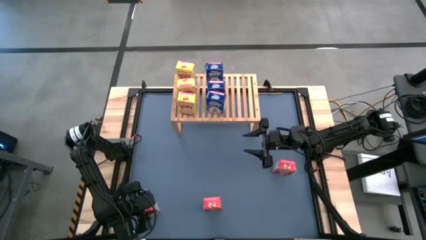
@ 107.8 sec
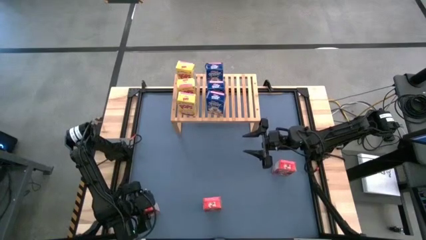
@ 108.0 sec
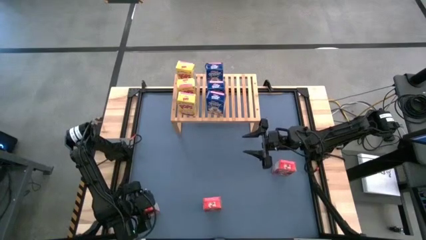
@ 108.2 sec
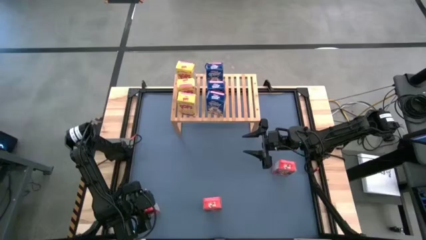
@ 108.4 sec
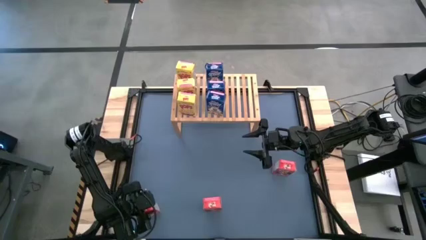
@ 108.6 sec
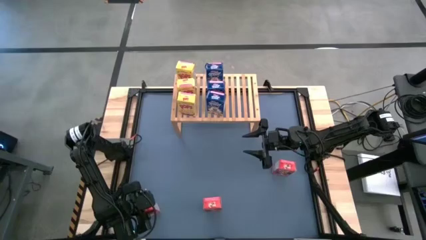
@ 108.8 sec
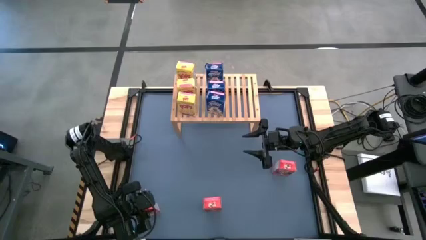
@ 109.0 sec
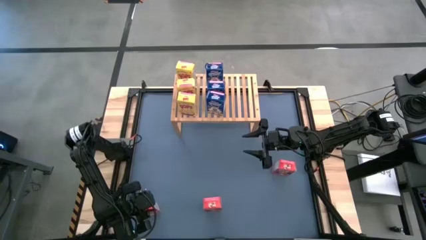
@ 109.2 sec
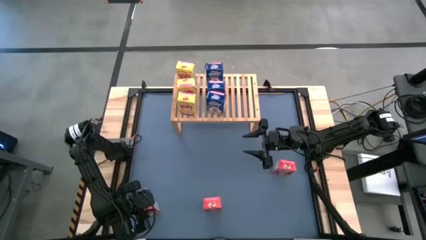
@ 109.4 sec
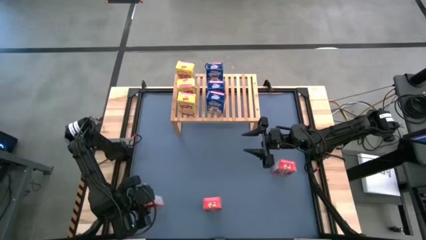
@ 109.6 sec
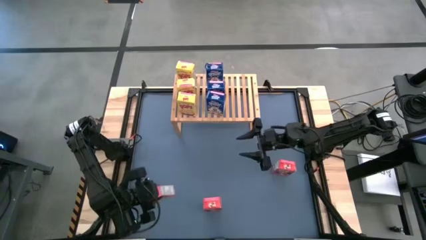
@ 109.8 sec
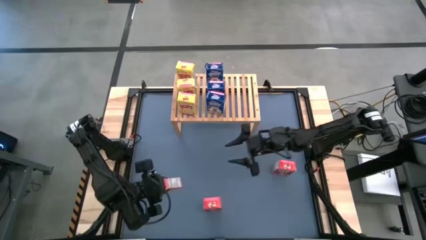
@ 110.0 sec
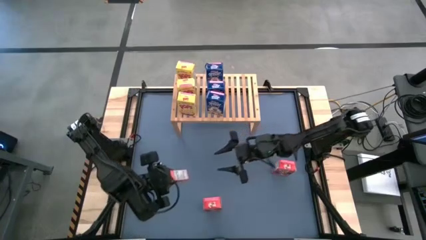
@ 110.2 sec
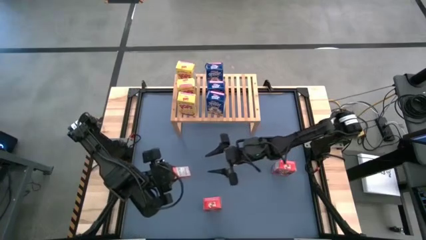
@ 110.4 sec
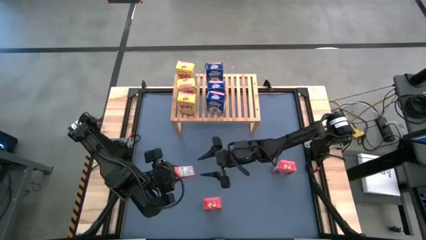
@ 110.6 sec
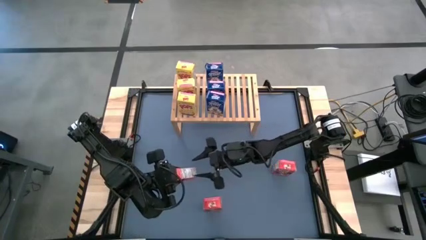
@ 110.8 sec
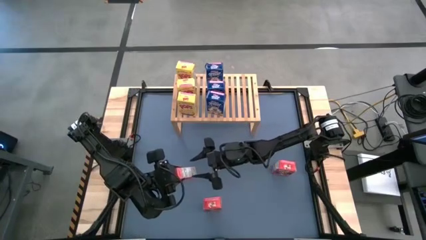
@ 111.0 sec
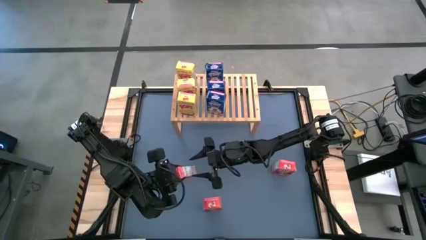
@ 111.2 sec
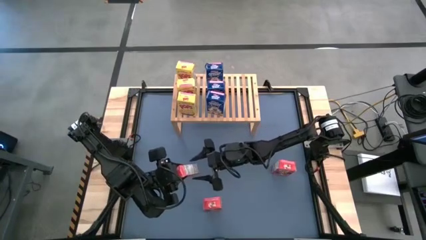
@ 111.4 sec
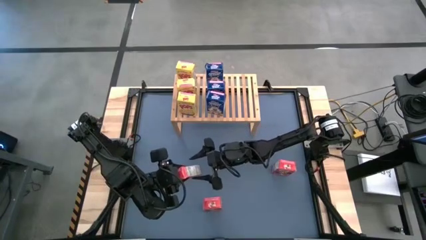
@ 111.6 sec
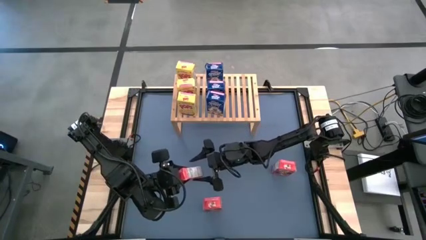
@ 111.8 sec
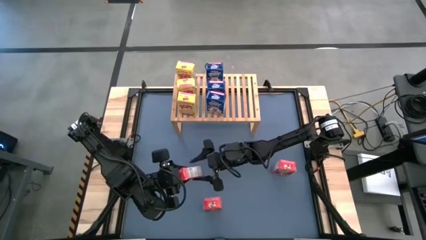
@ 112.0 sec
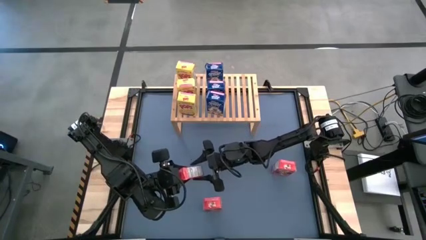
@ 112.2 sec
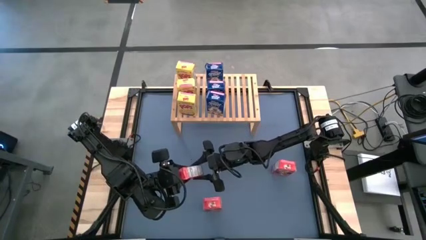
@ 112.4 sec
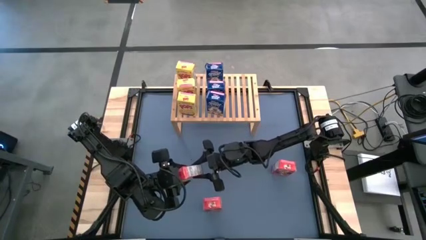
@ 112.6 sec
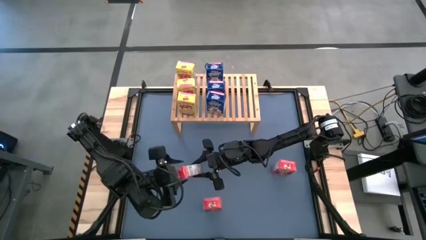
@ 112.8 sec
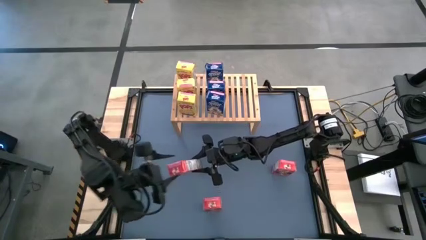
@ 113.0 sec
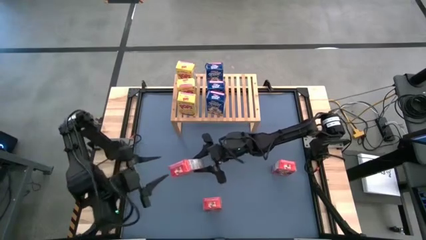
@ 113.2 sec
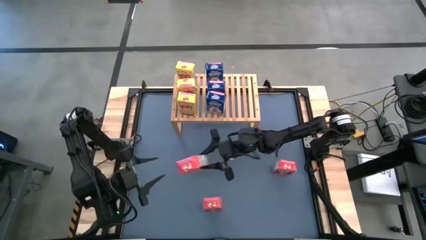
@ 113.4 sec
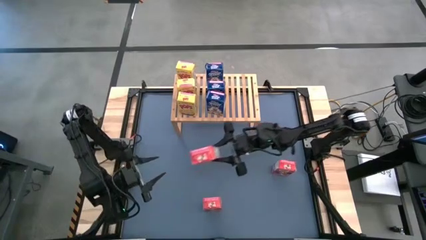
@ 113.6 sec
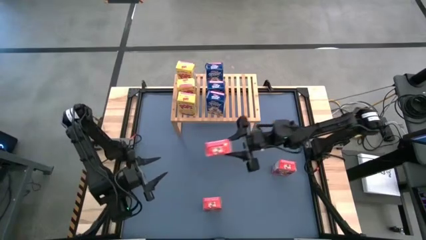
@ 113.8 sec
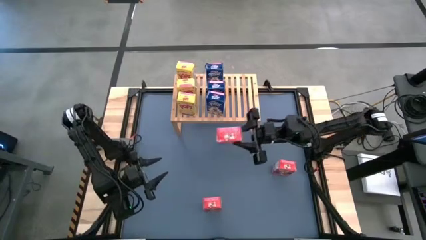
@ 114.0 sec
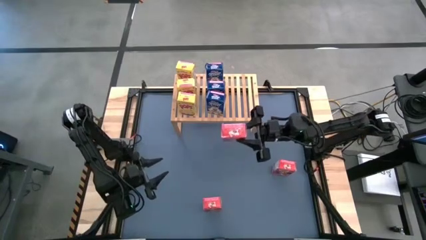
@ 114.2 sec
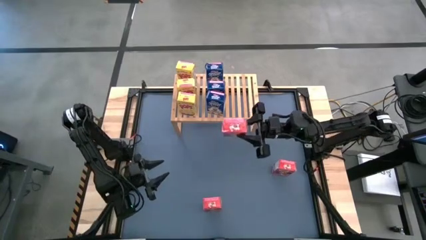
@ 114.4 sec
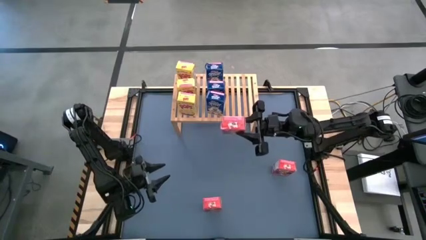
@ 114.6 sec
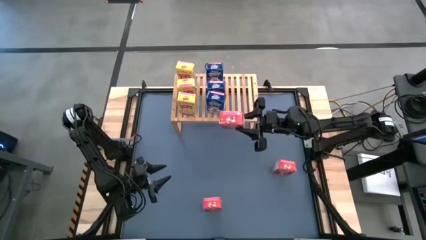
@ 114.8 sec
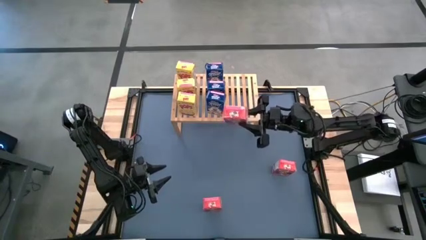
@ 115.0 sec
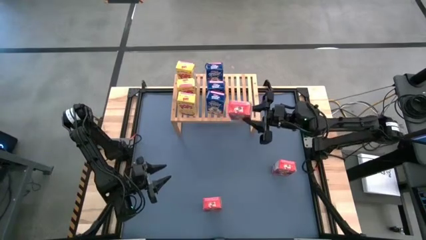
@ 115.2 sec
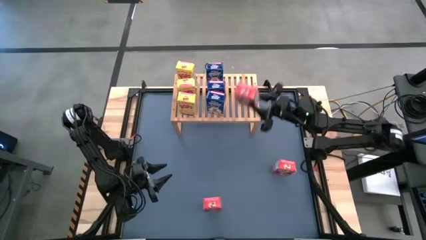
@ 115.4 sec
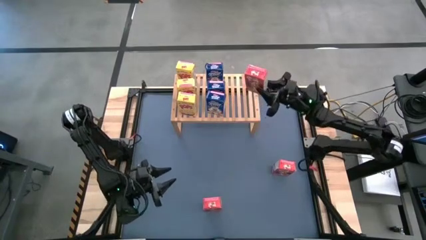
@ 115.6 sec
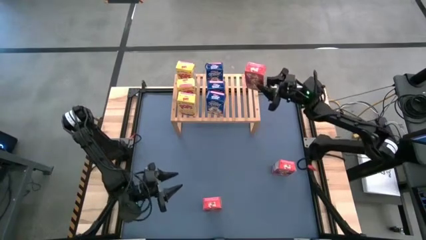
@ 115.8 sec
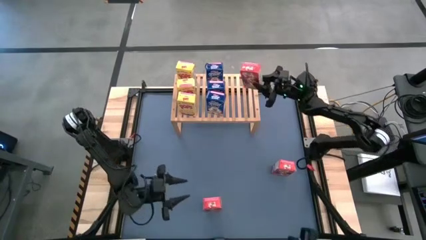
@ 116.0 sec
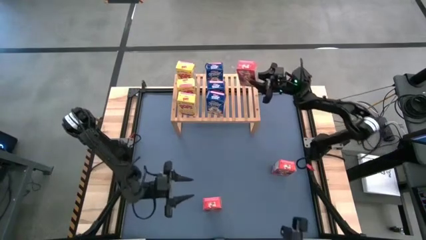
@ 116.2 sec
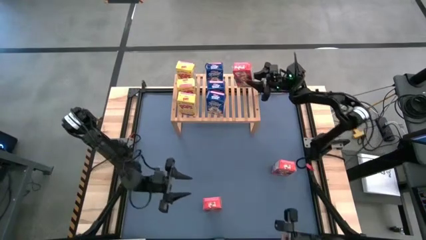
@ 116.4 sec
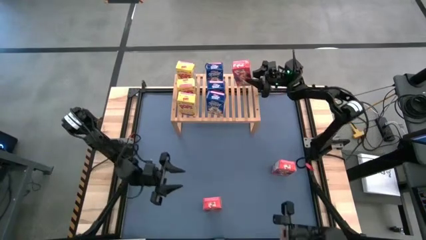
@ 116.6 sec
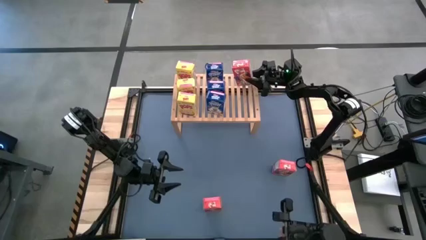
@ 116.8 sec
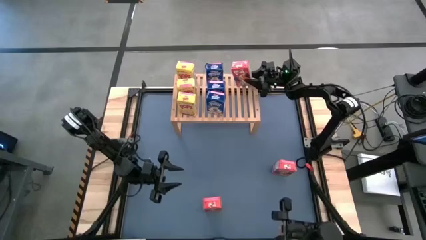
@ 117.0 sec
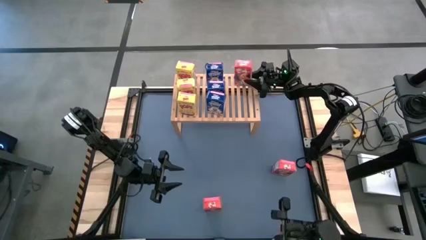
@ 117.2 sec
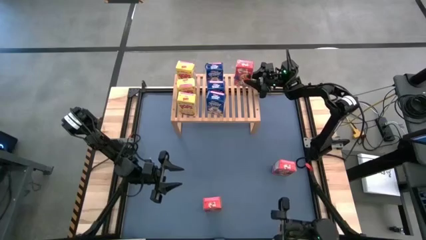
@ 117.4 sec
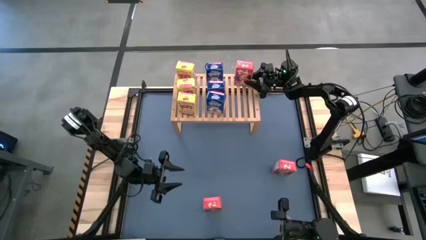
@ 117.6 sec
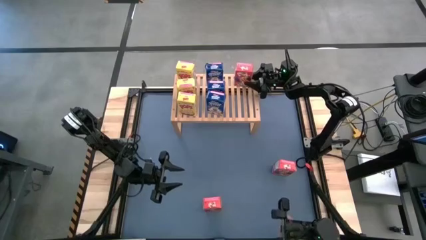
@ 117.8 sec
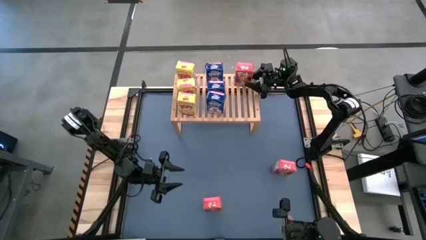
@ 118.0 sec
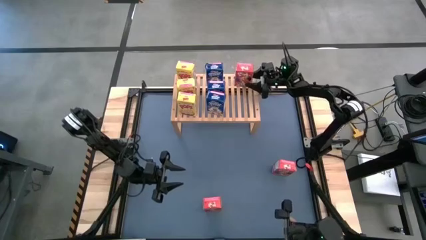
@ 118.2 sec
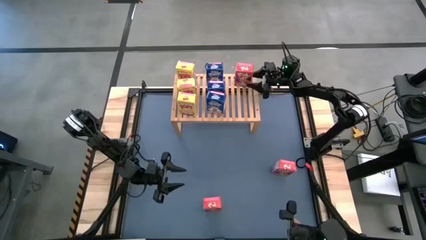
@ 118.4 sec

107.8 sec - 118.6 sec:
Task: Stack cereal on shelf
Put the bottom left red cereal box on the shelf
